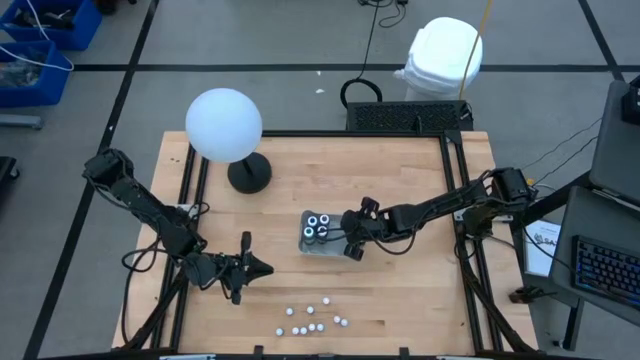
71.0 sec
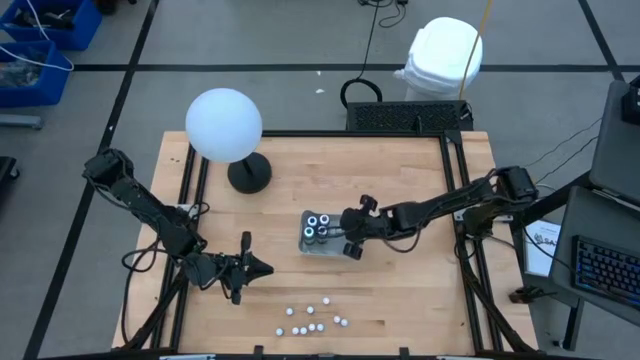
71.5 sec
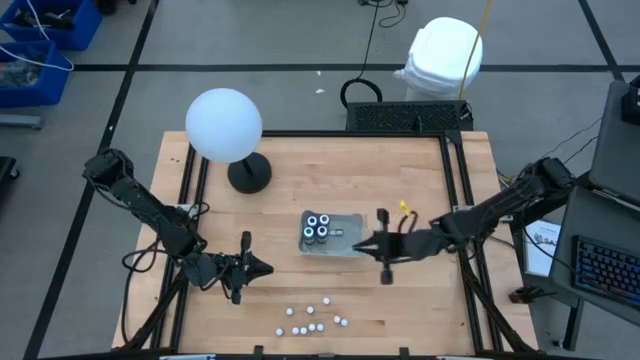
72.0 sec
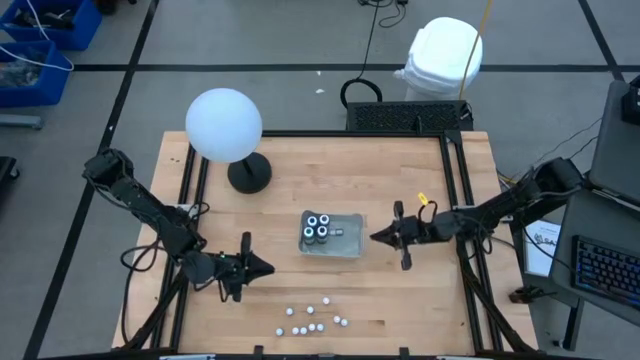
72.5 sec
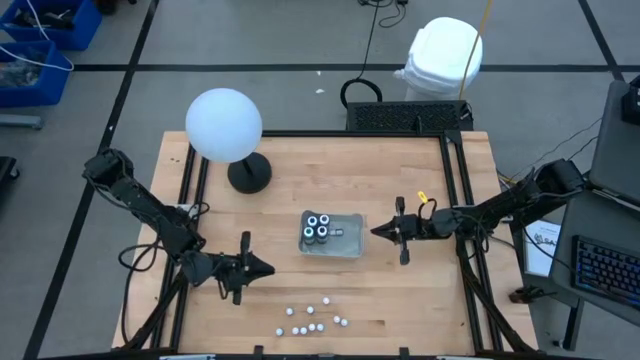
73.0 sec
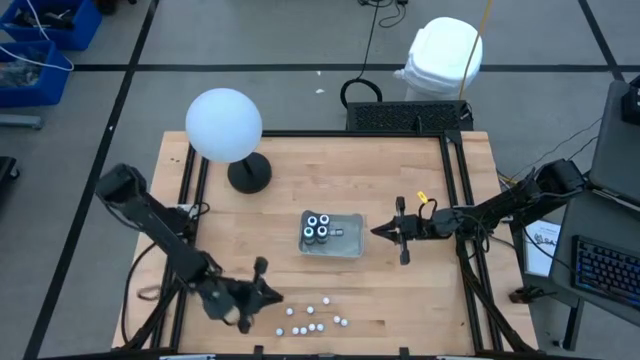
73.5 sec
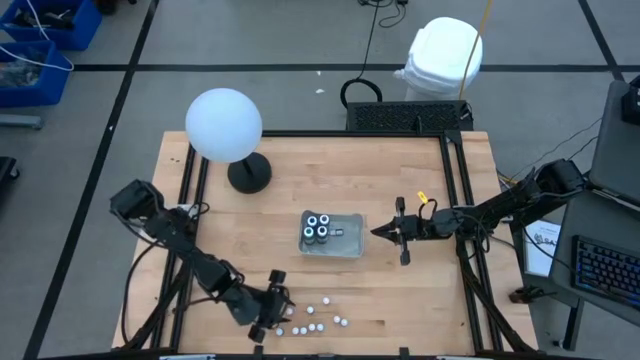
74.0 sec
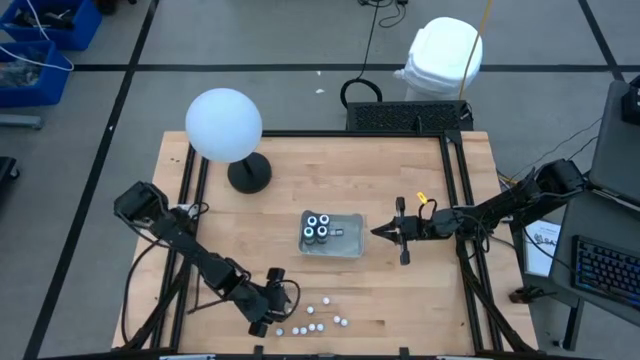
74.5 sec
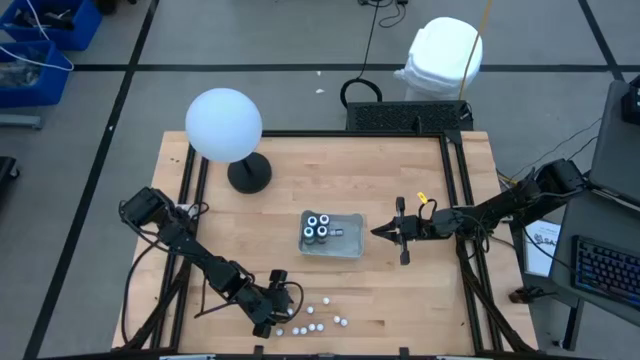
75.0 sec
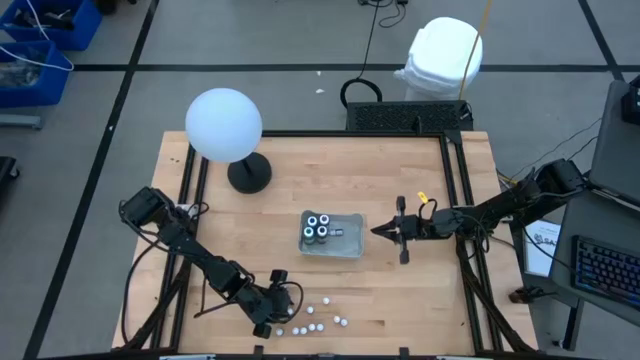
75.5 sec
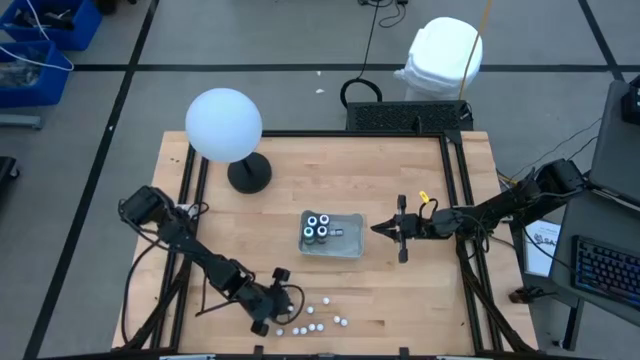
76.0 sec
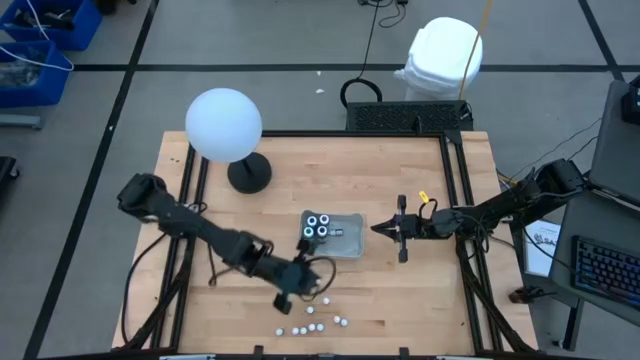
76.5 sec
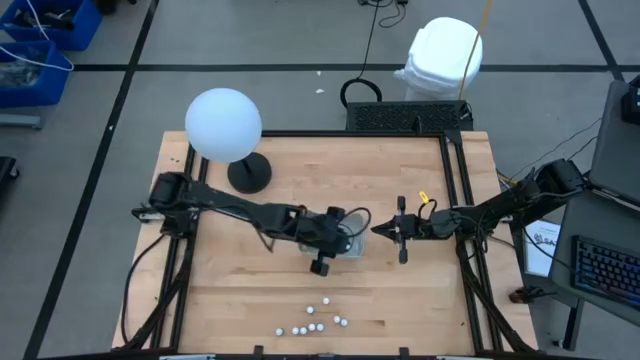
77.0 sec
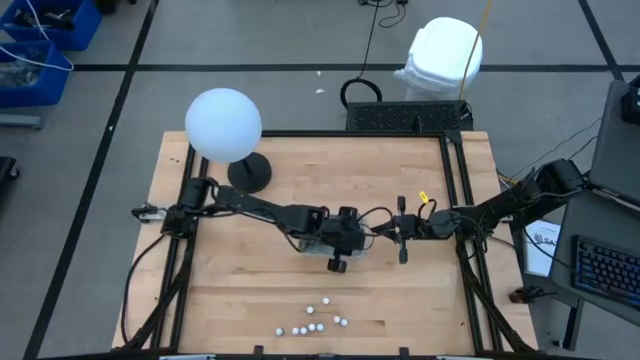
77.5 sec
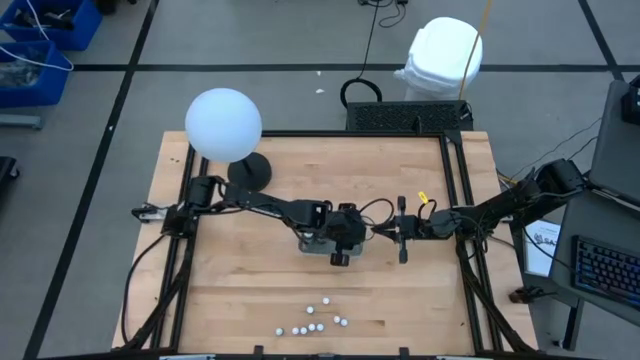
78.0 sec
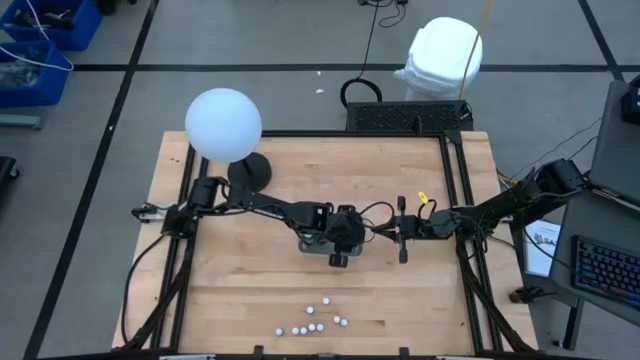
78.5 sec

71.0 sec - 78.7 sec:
Task: Pick & Place food coloring
Put the small violet food coloring bottle into the gray bin

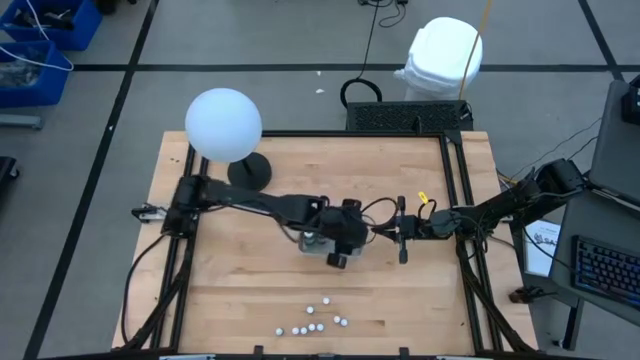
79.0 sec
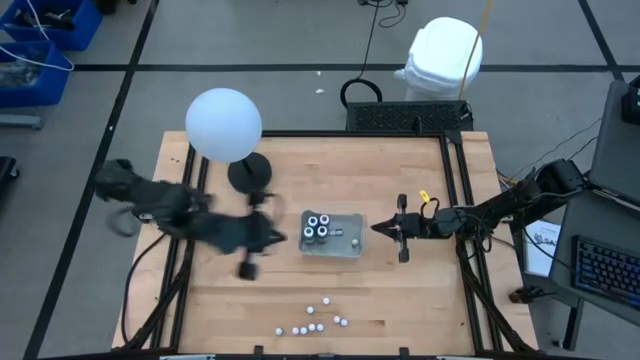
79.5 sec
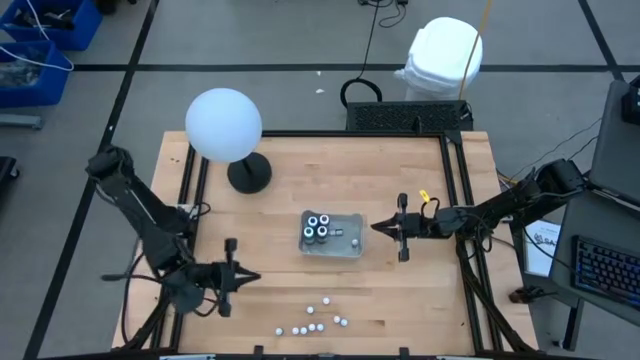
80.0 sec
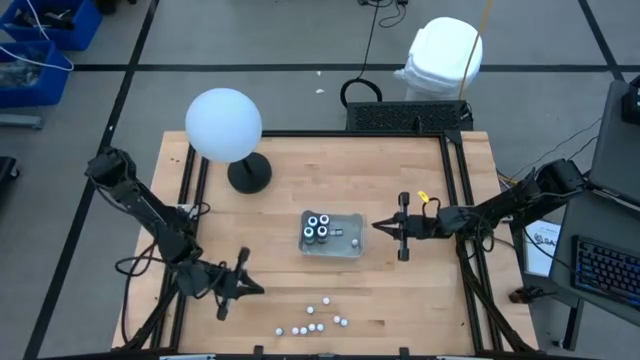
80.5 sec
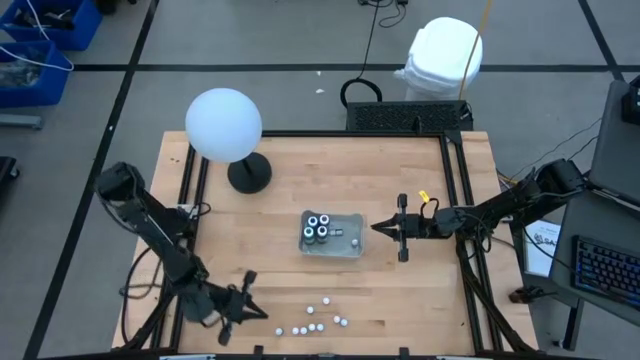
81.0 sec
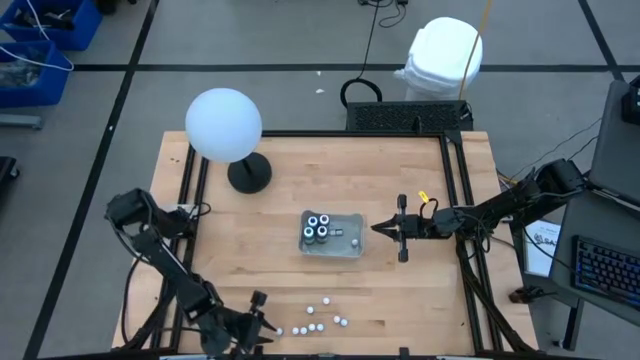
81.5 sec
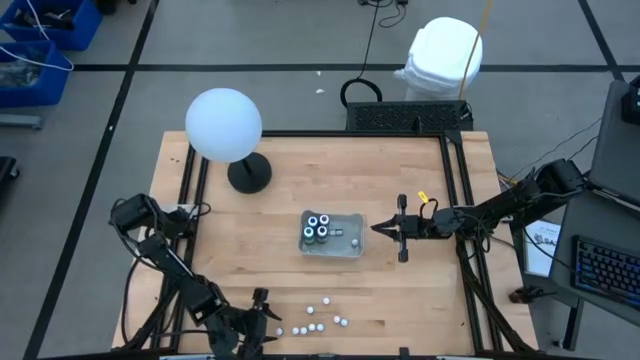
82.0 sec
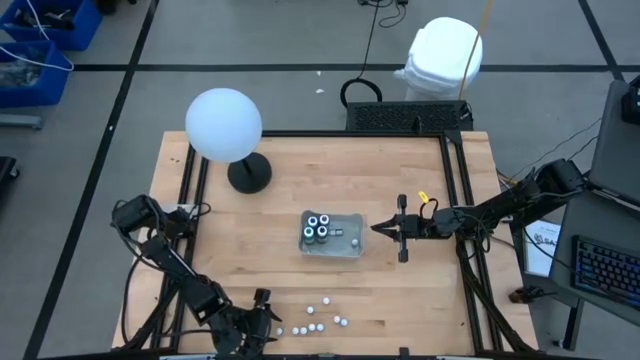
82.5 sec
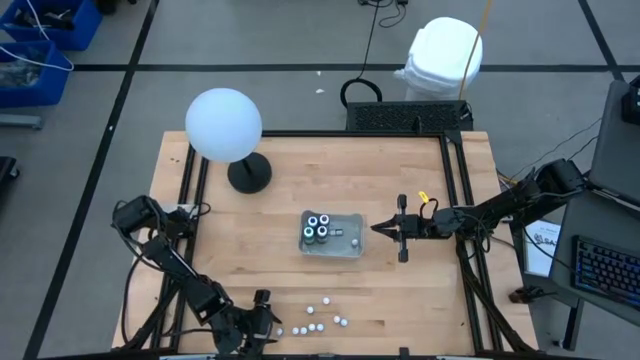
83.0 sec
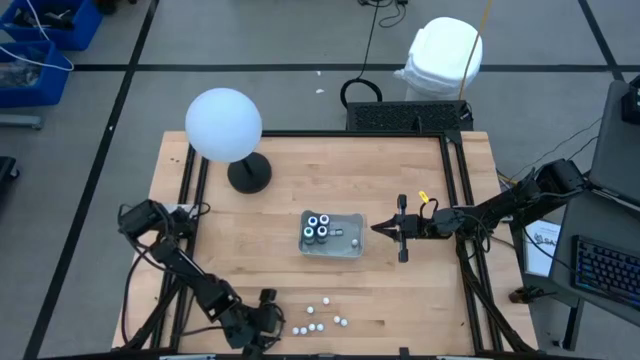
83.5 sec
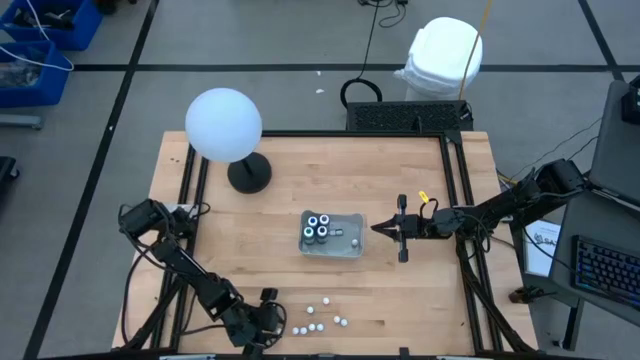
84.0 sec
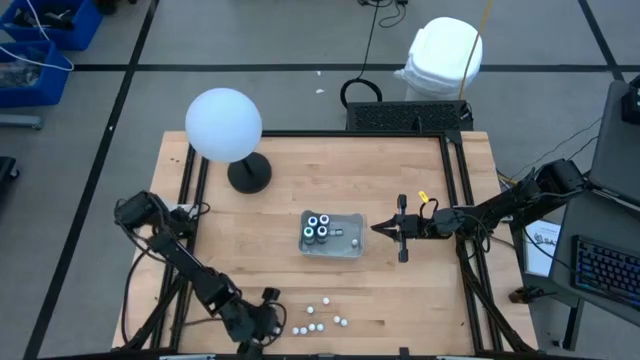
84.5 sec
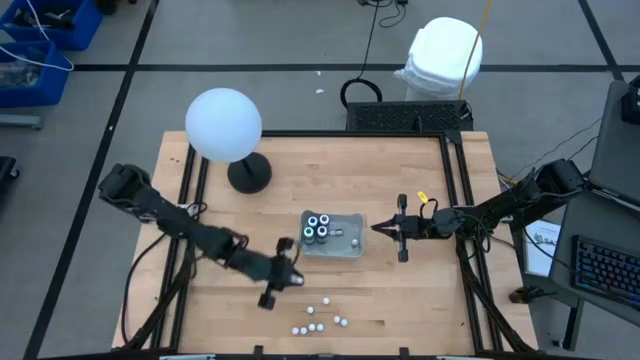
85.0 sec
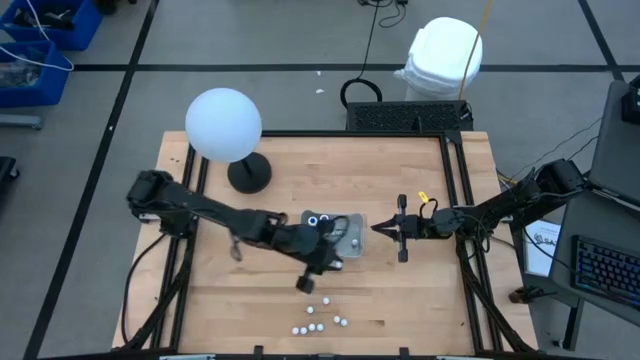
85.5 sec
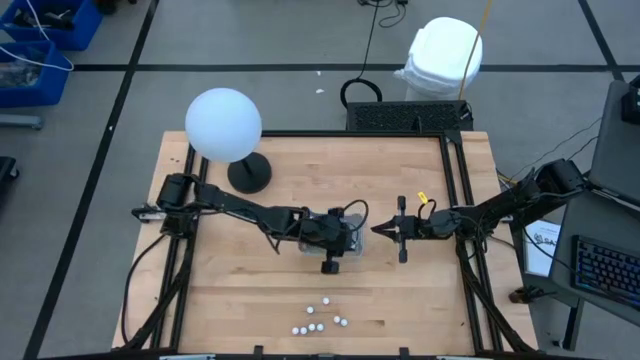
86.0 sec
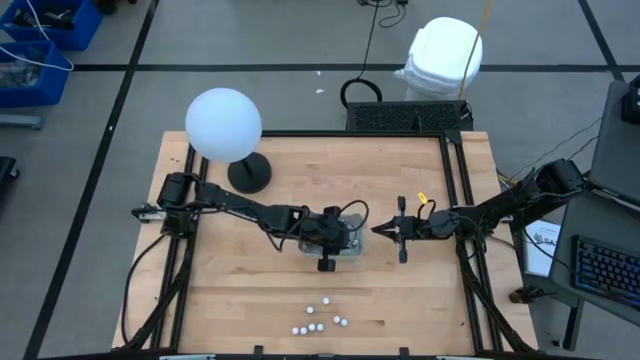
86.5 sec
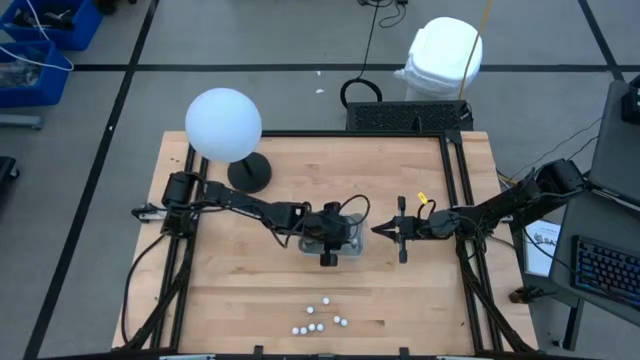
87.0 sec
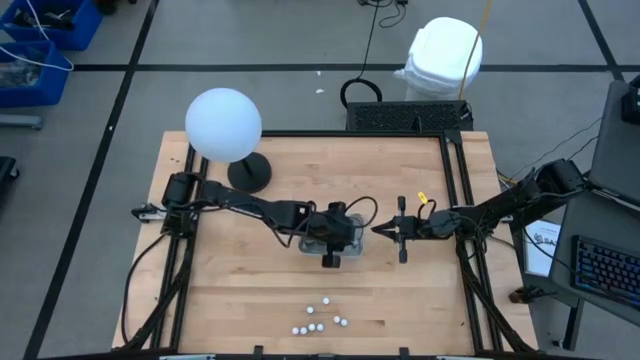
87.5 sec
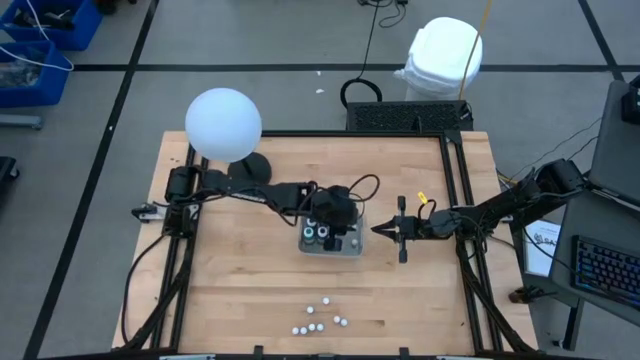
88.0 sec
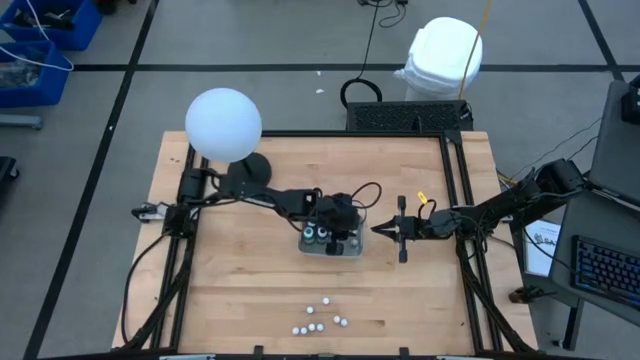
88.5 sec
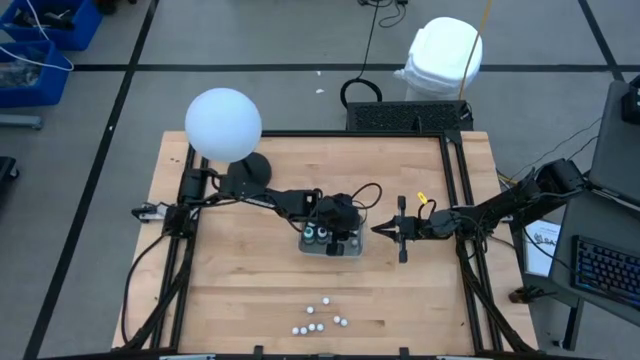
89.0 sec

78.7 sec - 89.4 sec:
Put the small blue food coloring bottle into the gray bin

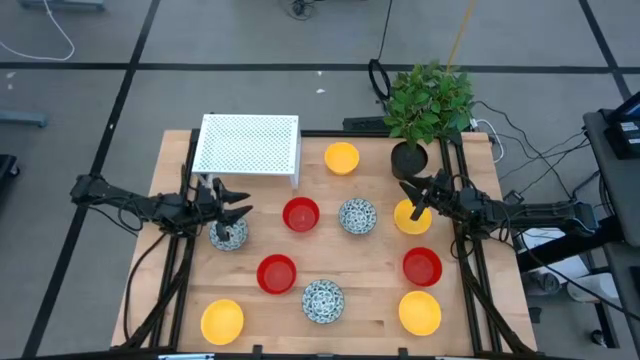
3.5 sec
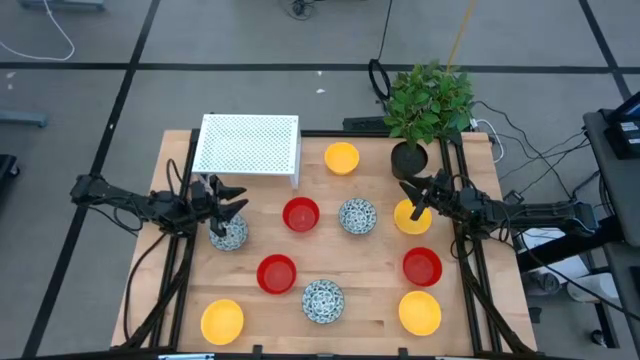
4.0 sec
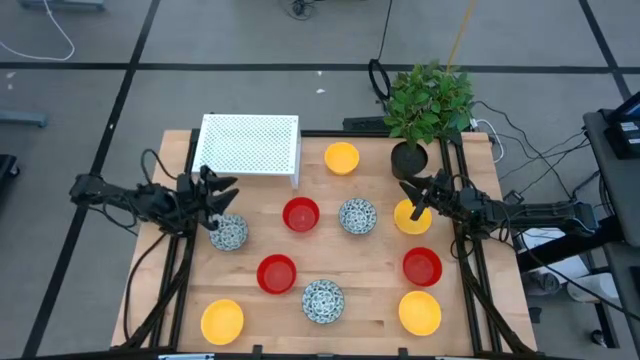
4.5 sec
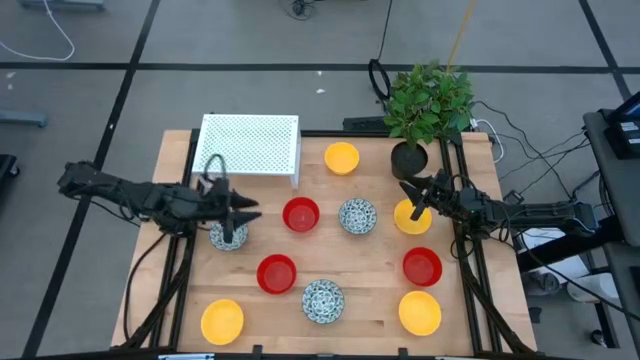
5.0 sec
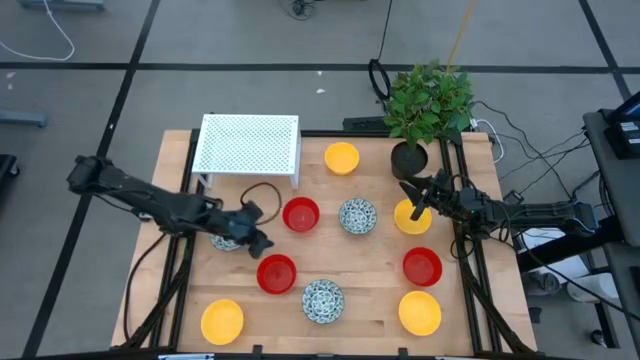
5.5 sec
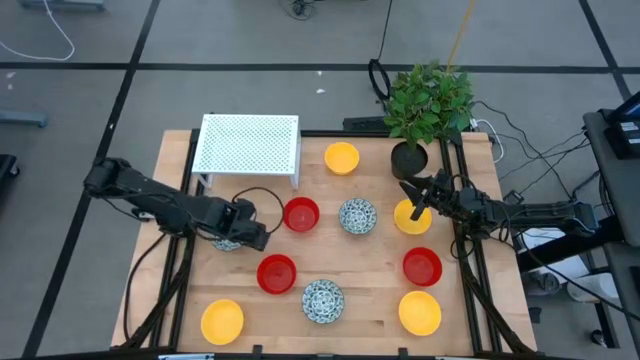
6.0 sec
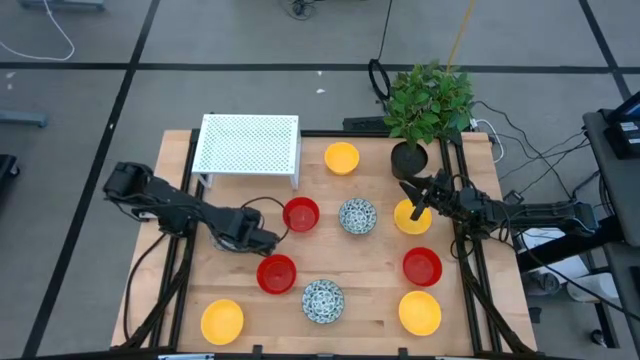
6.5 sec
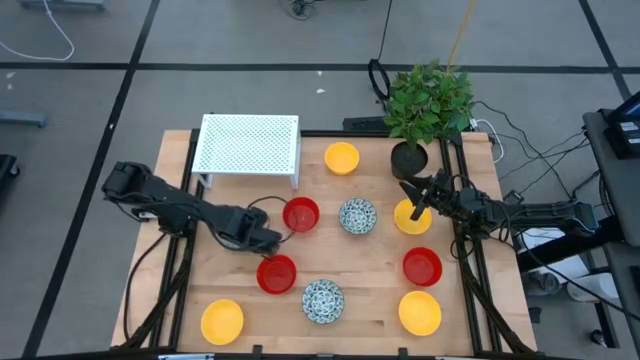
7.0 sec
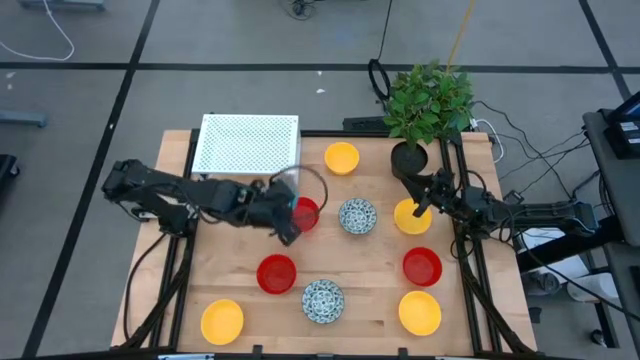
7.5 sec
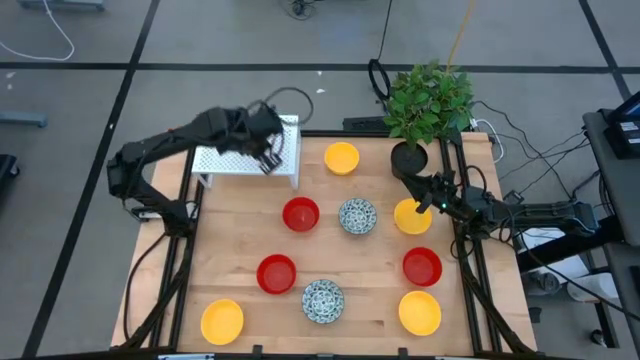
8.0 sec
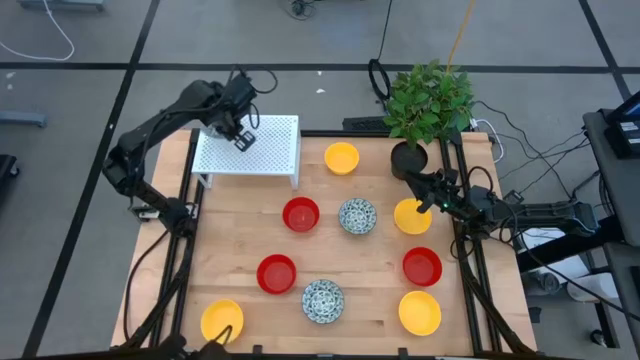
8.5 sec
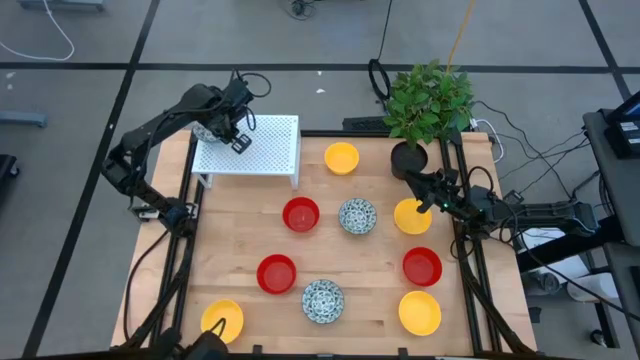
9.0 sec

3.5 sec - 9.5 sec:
Task: Pick & Place Mini bowls
Put the top left blue patterned bowl on the shelf
